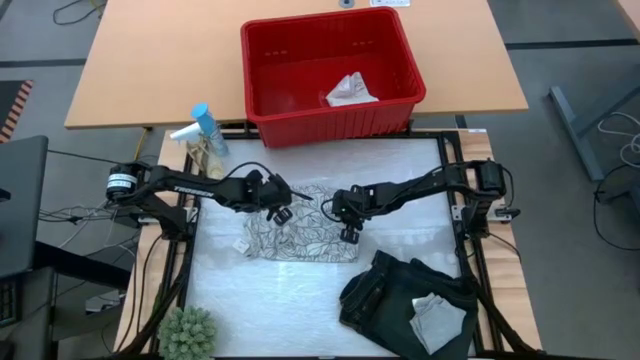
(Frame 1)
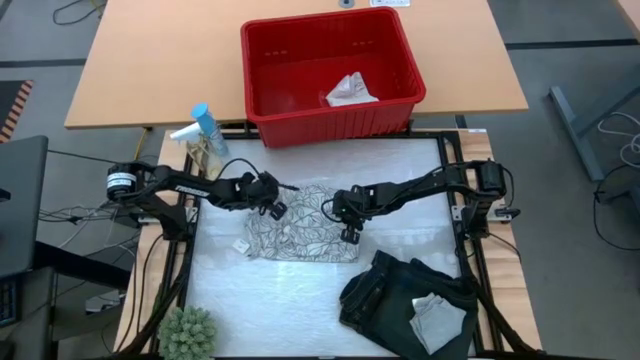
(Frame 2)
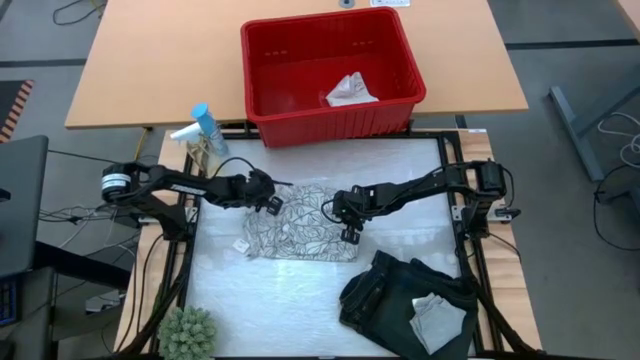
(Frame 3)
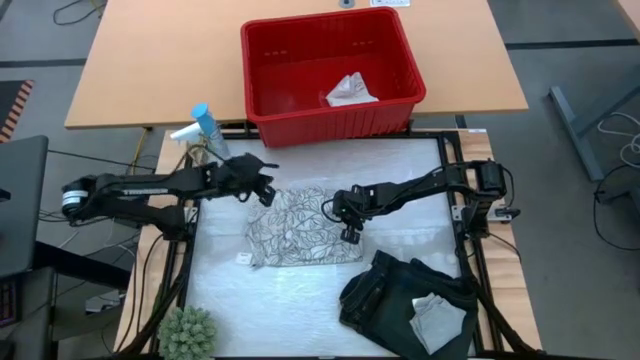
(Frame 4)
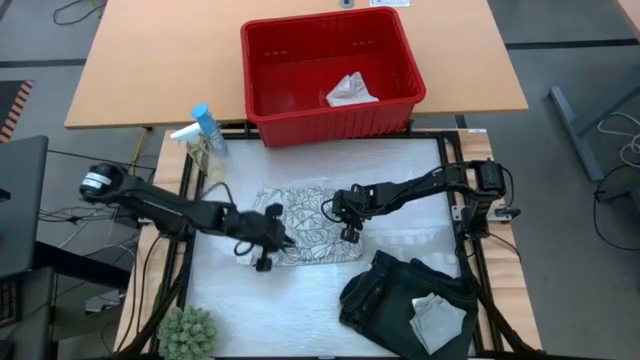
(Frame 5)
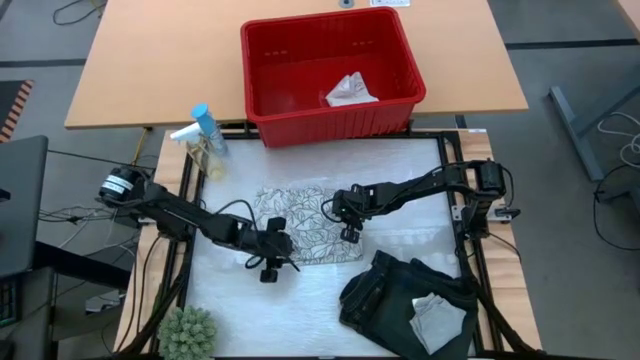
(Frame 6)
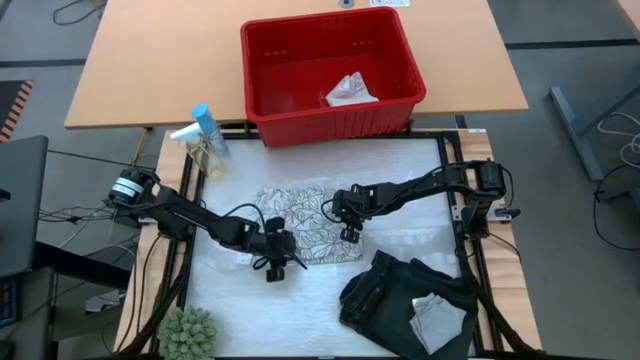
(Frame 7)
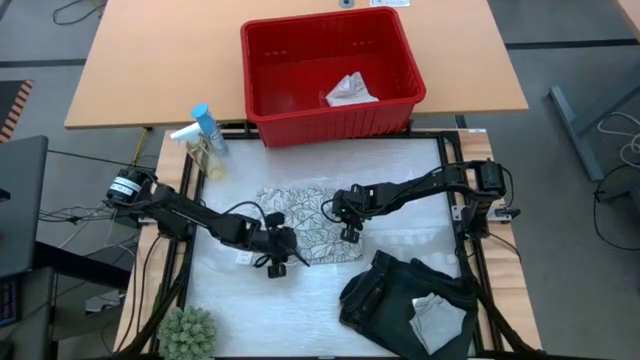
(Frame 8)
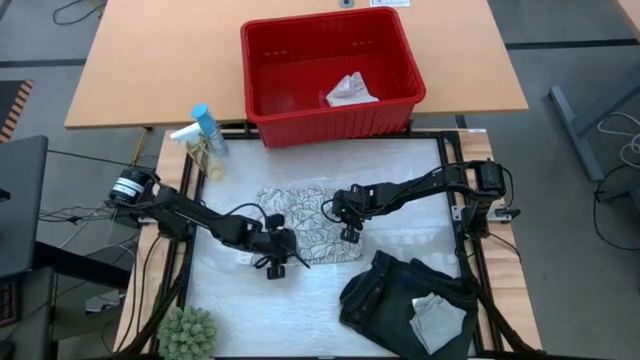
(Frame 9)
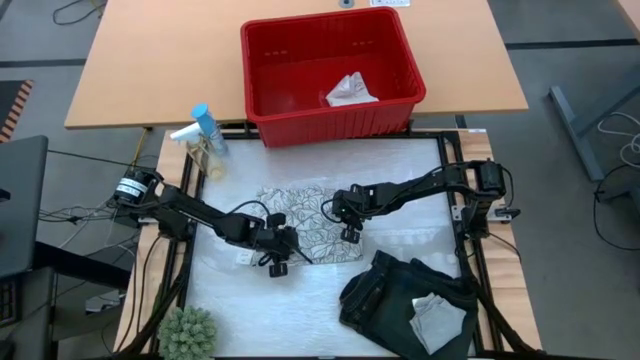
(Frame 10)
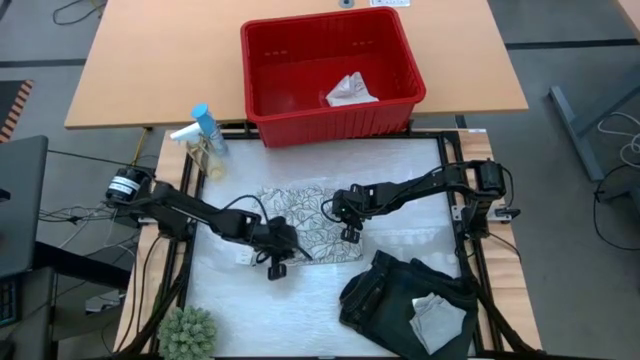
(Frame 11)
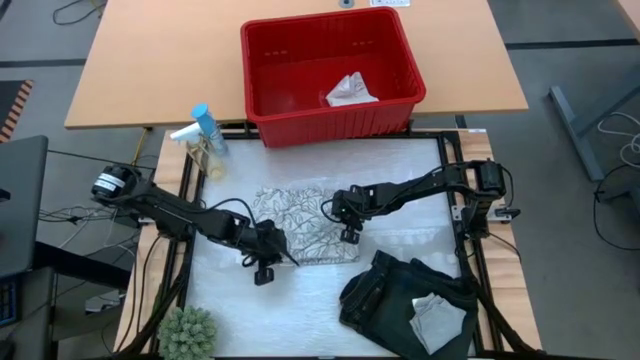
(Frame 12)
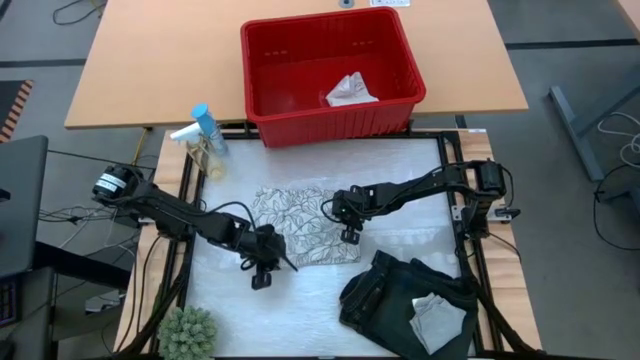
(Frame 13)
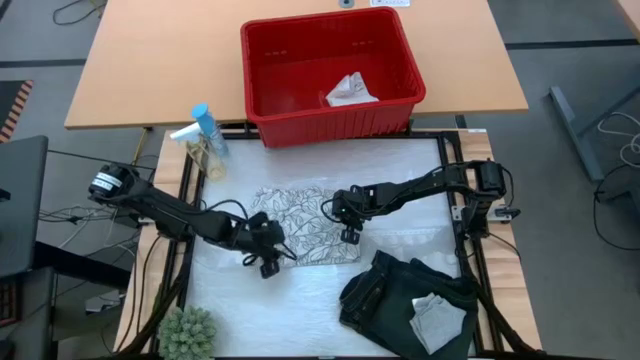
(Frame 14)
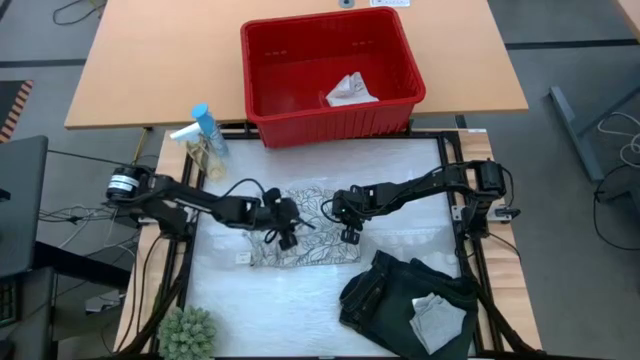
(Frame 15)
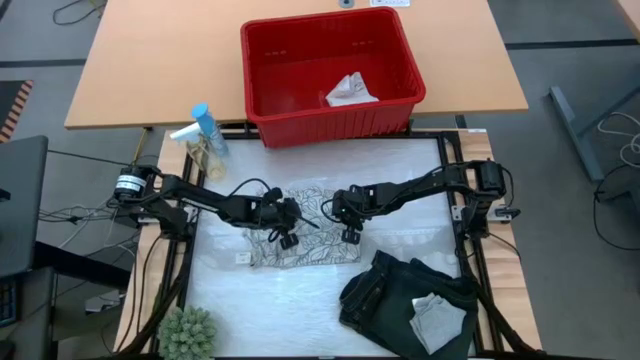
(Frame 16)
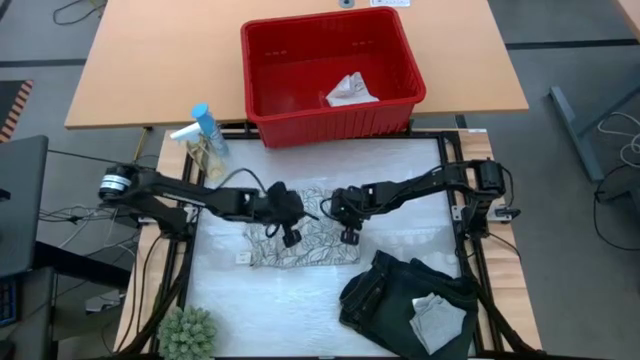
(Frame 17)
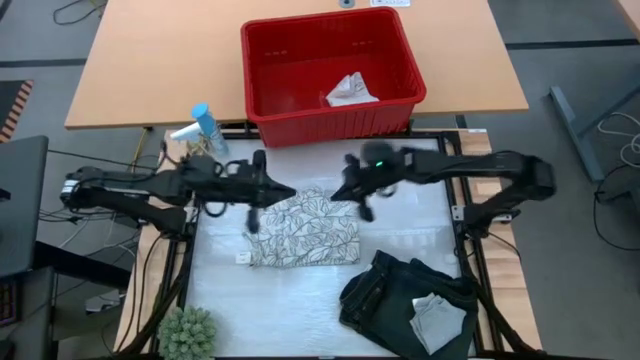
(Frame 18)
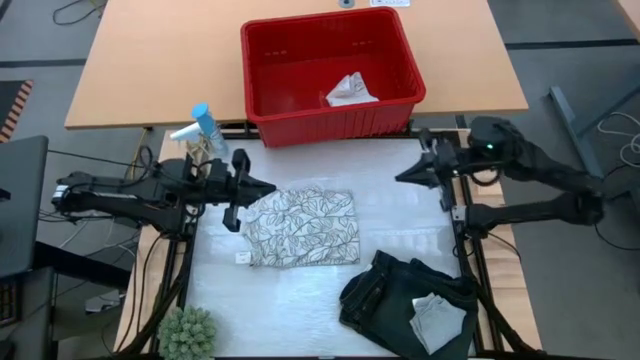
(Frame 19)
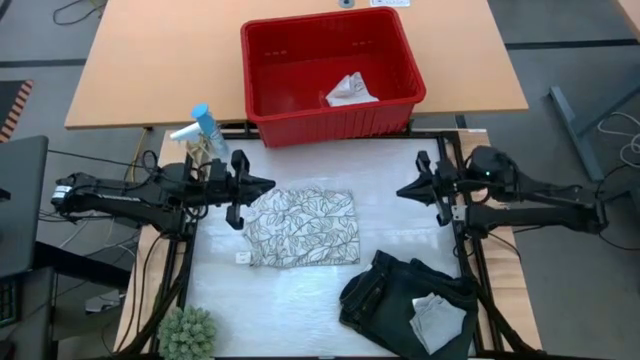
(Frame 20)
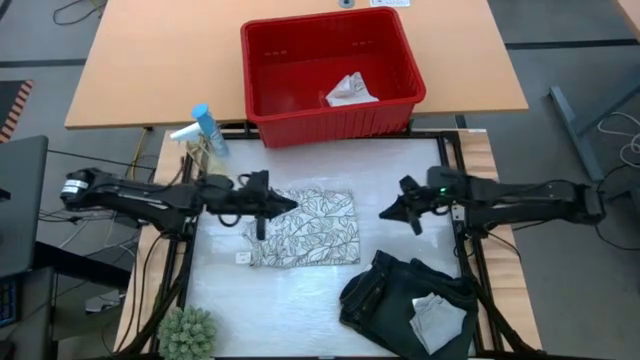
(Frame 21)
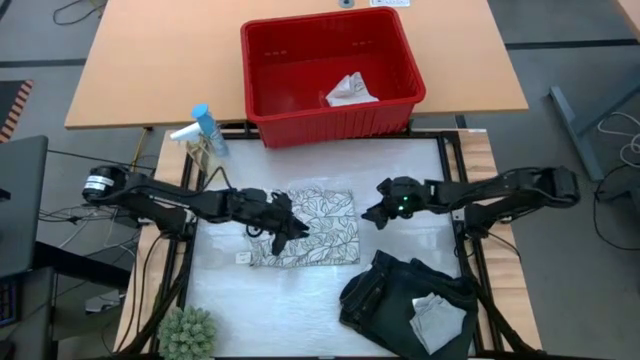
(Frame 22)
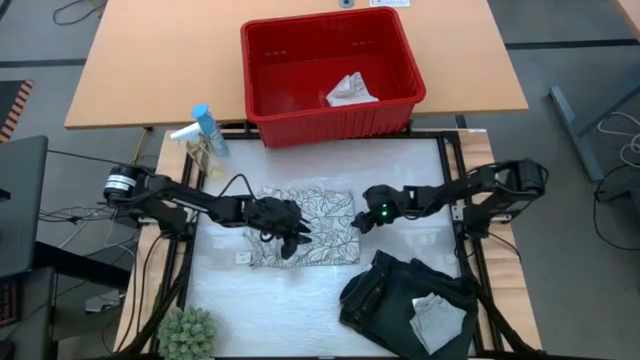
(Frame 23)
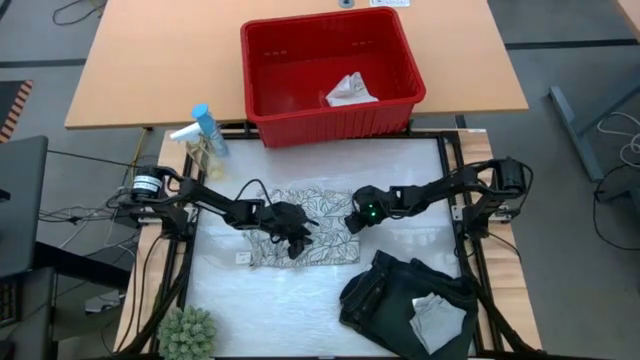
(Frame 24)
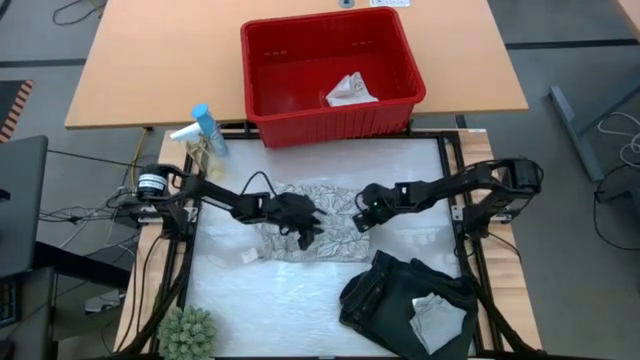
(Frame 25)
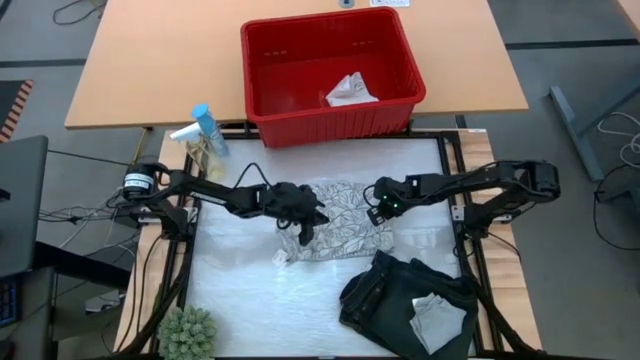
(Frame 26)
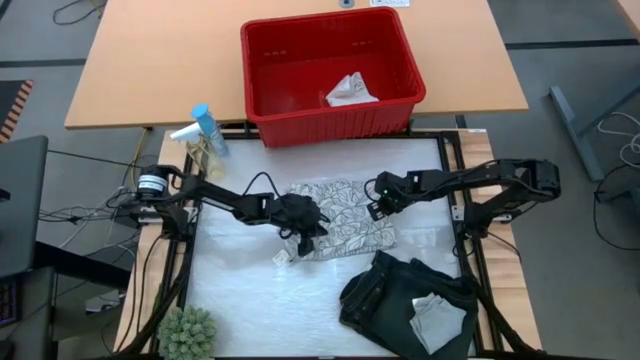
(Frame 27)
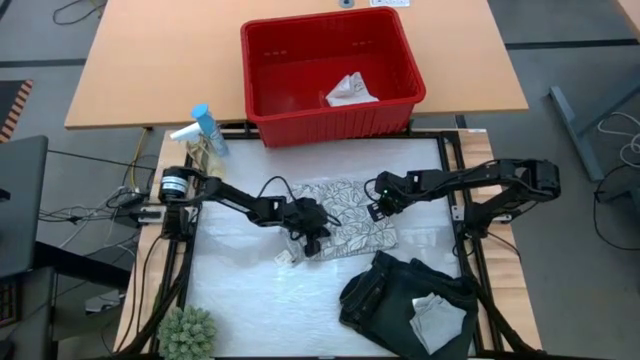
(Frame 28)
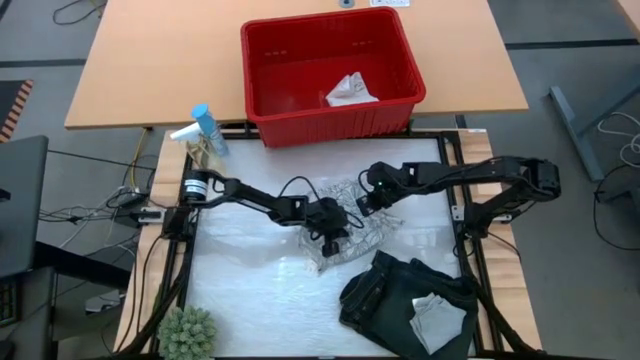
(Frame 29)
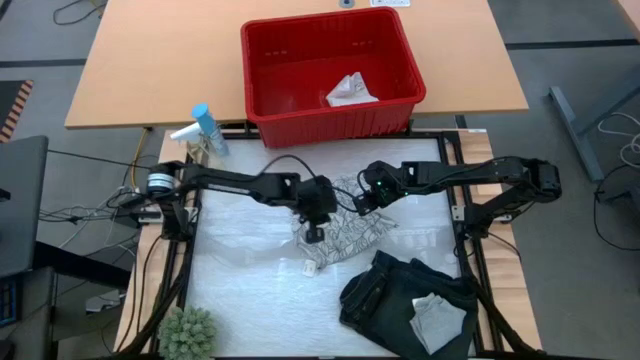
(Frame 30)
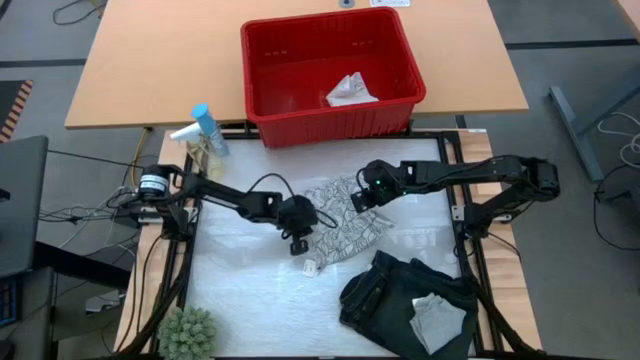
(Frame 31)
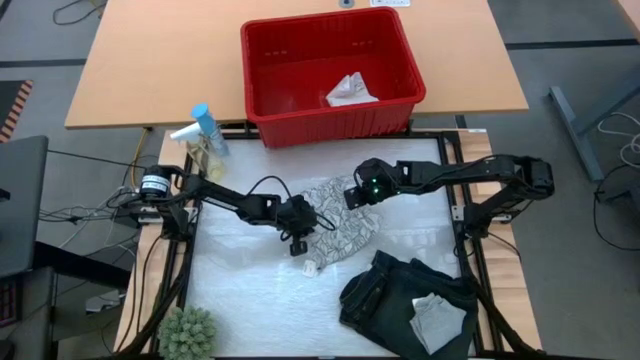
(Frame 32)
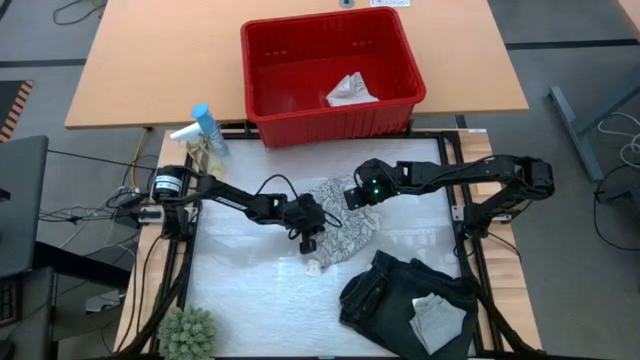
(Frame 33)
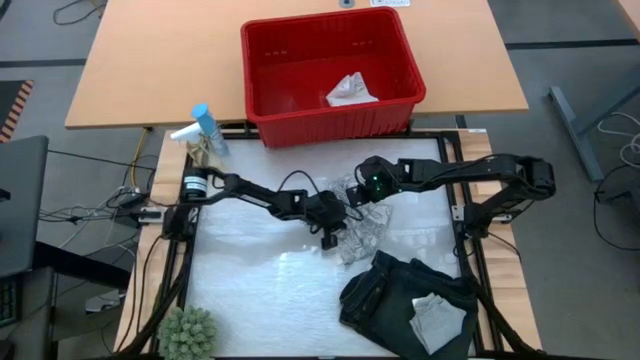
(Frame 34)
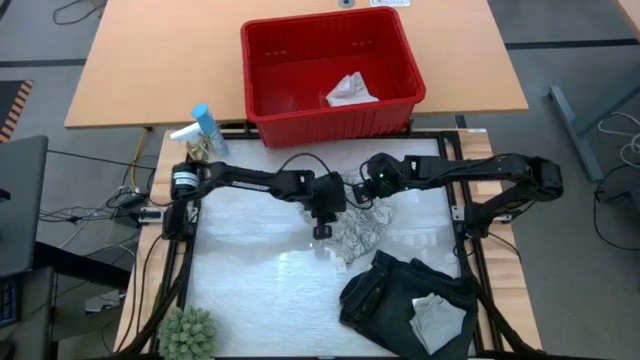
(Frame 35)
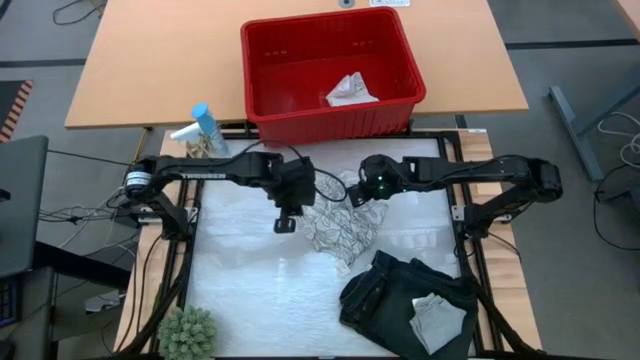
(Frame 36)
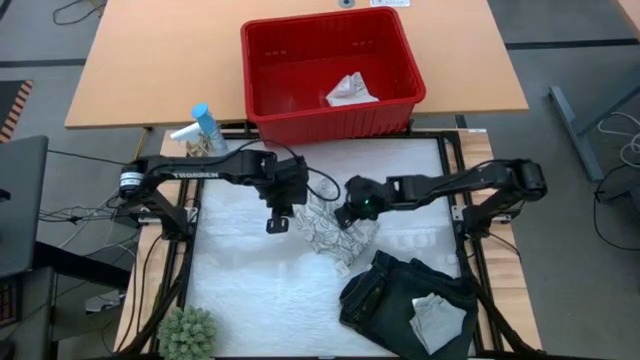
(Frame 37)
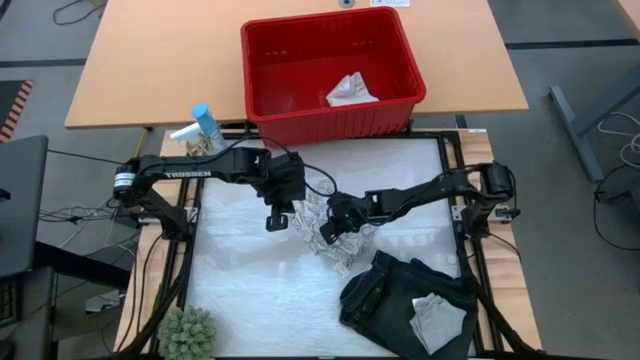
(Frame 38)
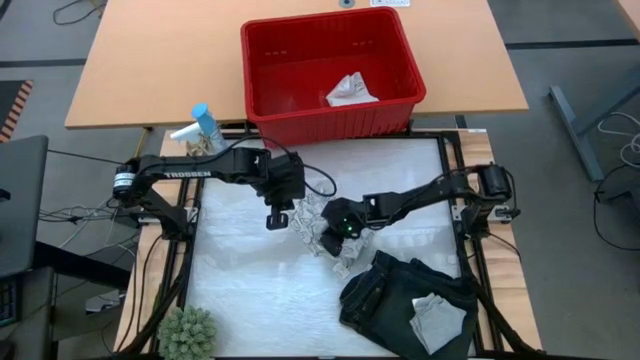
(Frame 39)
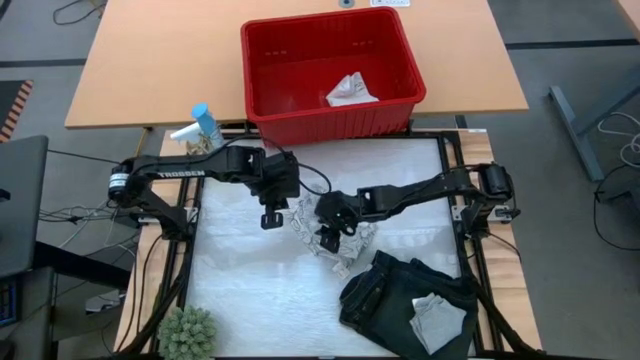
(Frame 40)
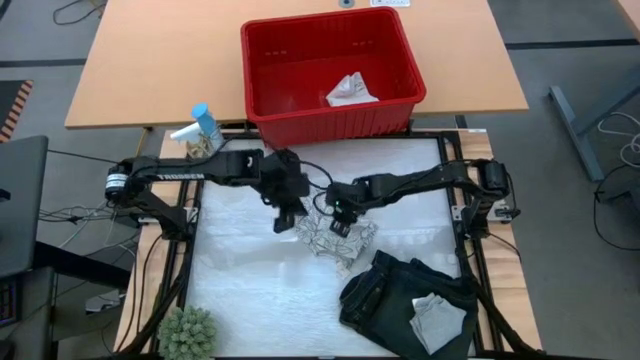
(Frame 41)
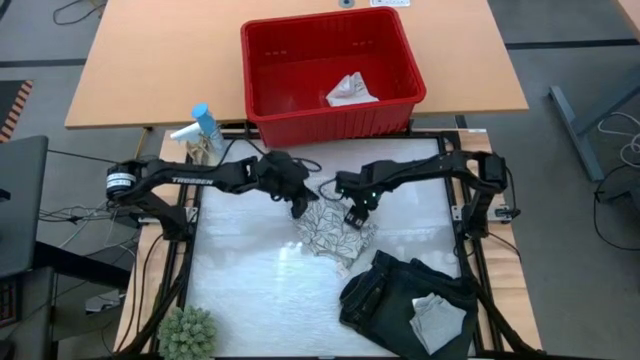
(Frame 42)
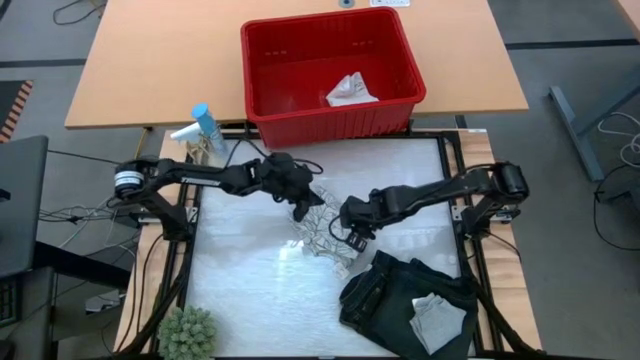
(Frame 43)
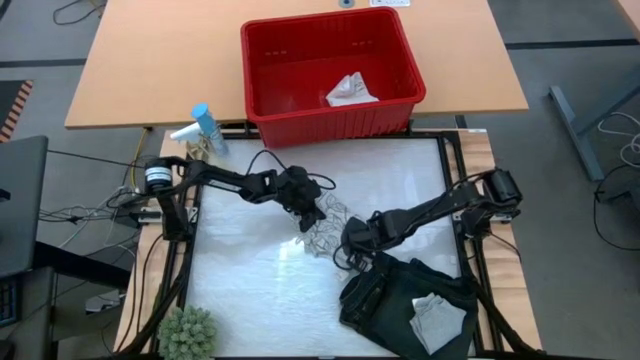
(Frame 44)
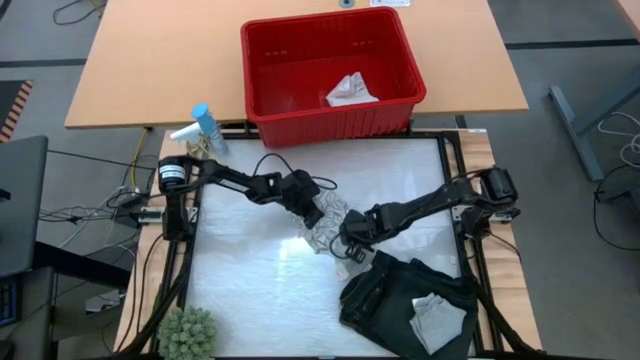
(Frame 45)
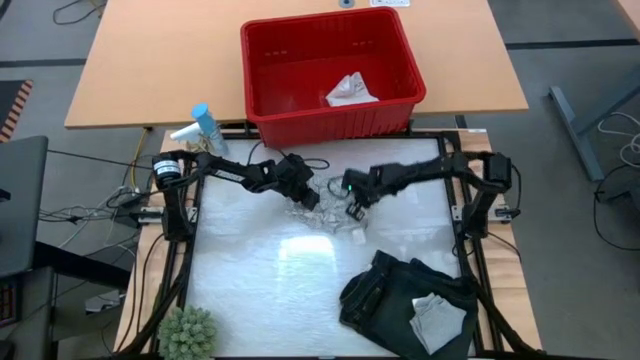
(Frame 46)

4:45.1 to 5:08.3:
Task: Fold Laundry from Bin
Fold the white from the red laundry bin
